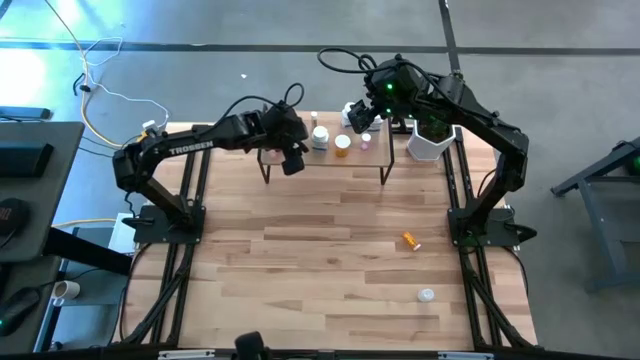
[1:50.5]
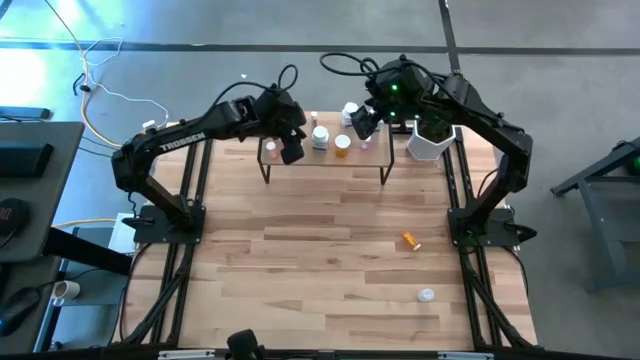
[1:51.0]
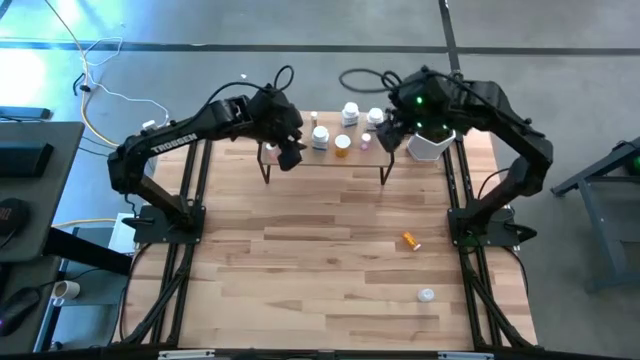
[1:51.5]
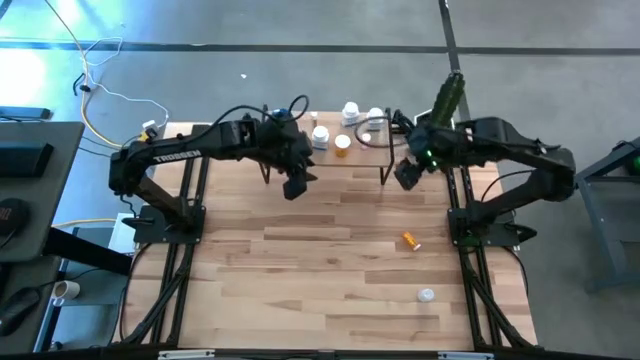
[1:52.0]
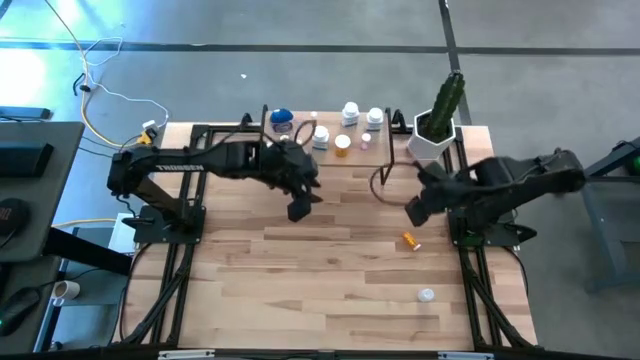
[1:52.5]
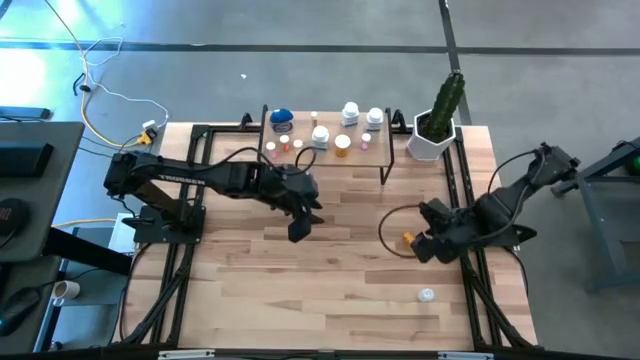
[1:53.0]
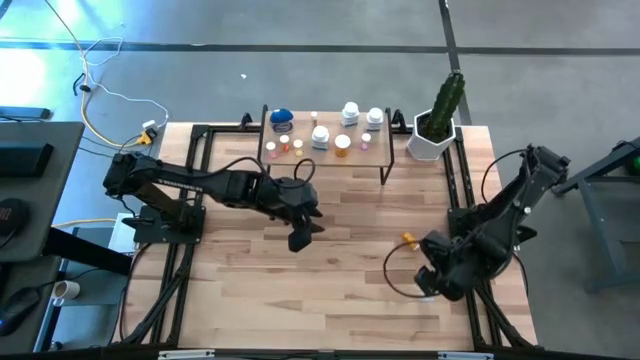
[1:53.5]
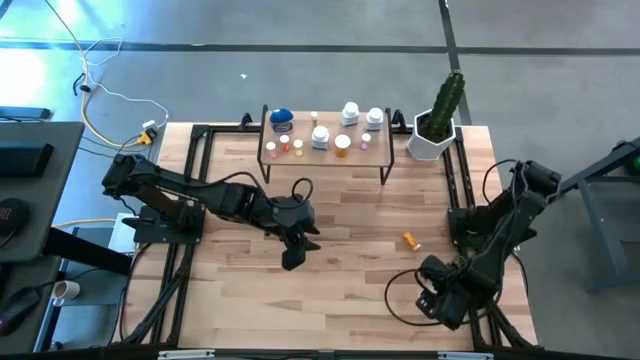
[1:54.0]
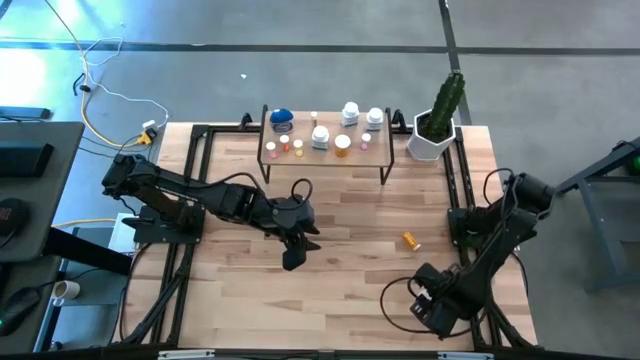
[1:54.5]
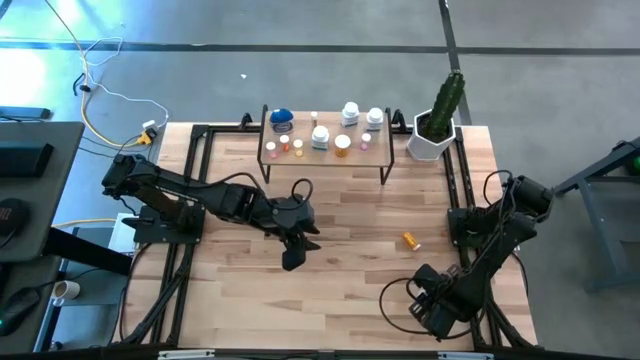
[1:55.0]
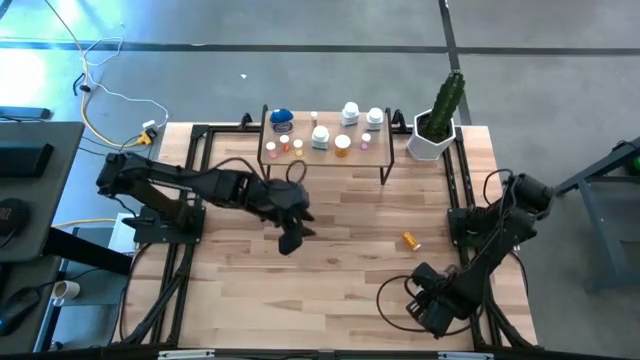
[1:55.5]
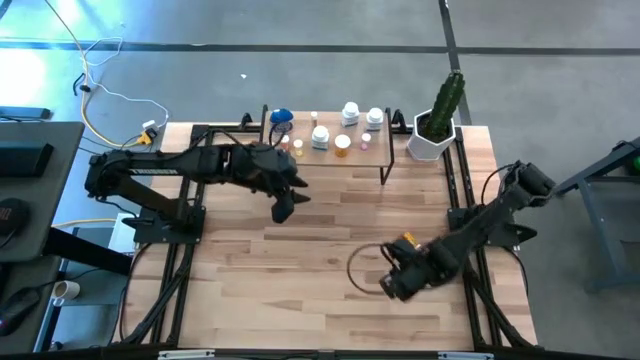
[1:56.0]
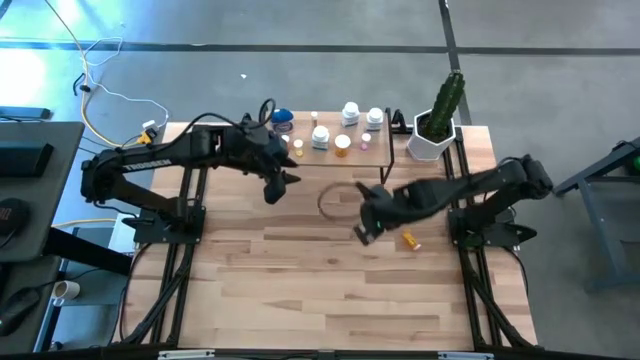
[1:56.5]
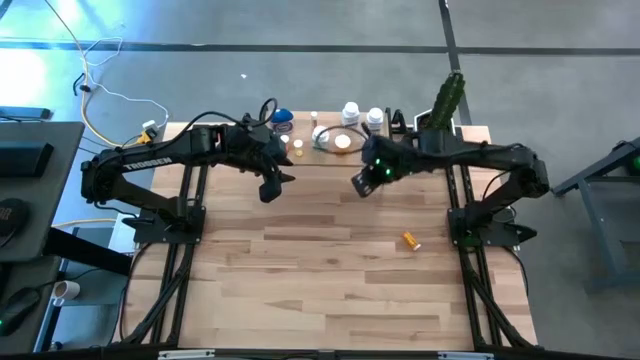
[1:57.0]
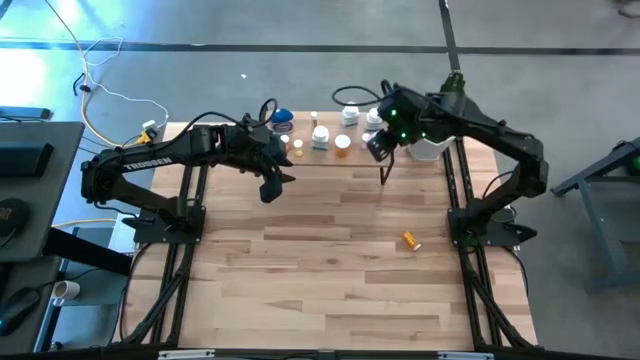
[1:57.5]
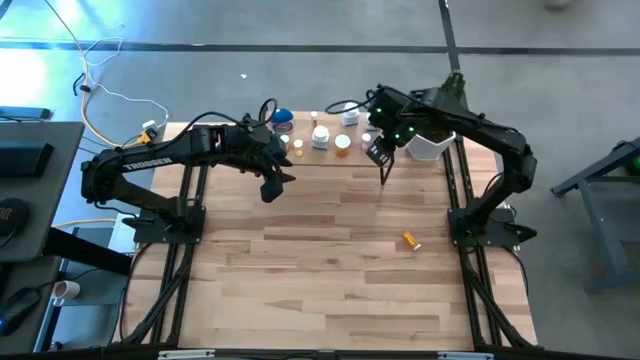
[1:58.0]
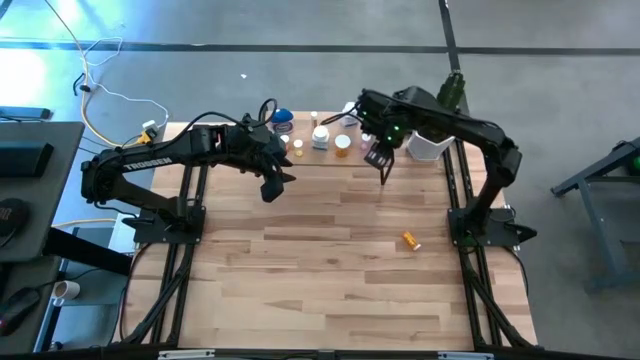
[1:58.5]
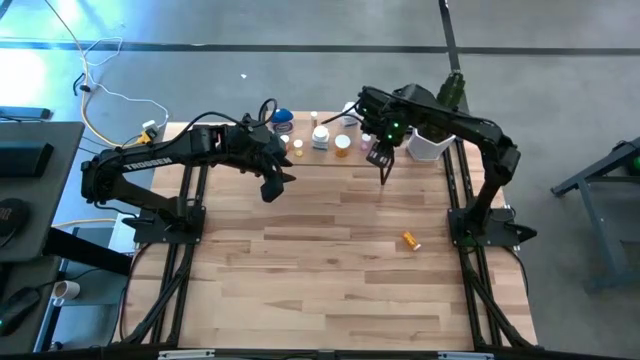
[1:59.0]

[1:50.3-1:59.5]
Task: Pick and place medicine bottles onto shelf by color
Put the white pill bottle on the shelf

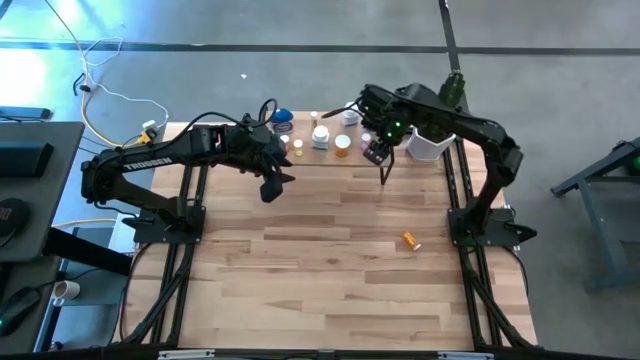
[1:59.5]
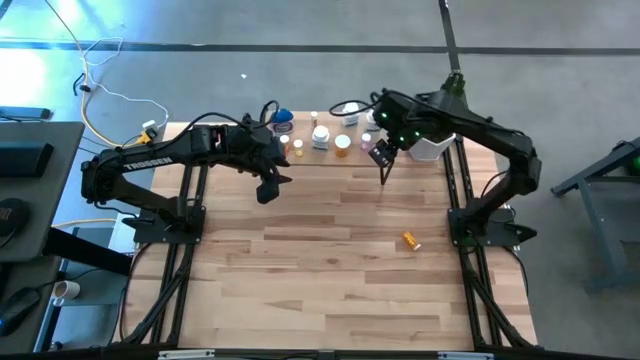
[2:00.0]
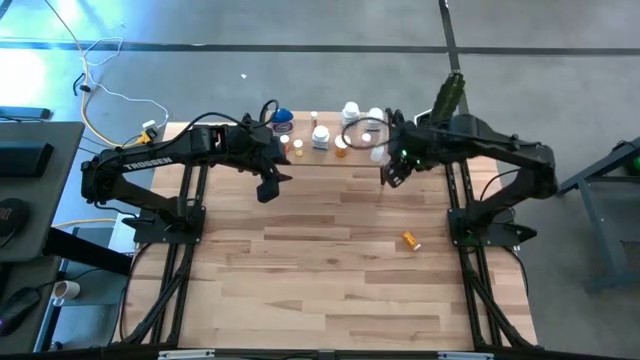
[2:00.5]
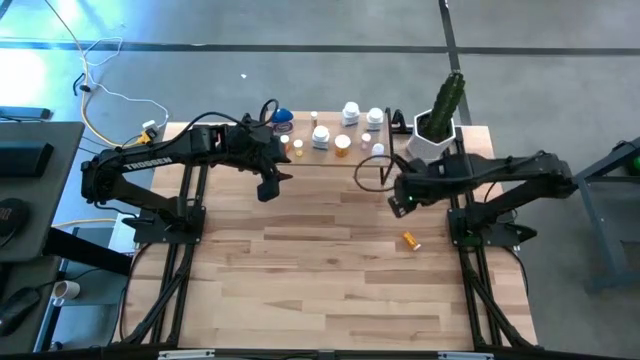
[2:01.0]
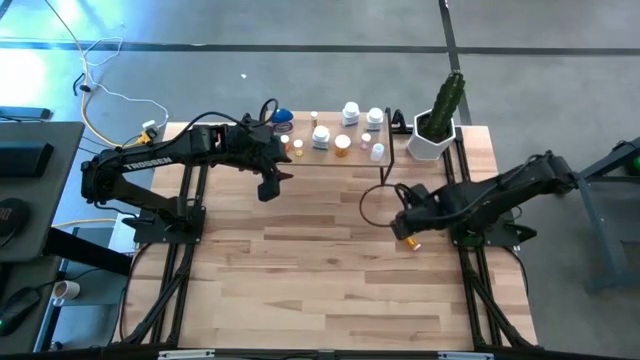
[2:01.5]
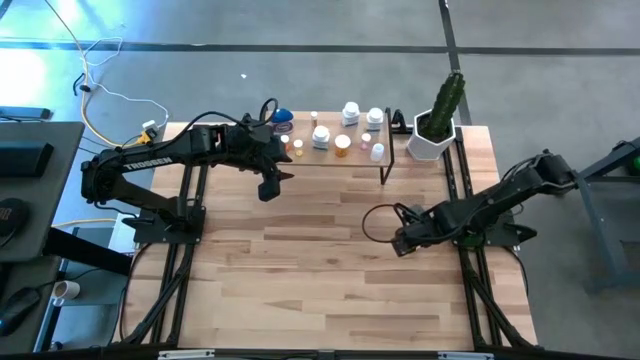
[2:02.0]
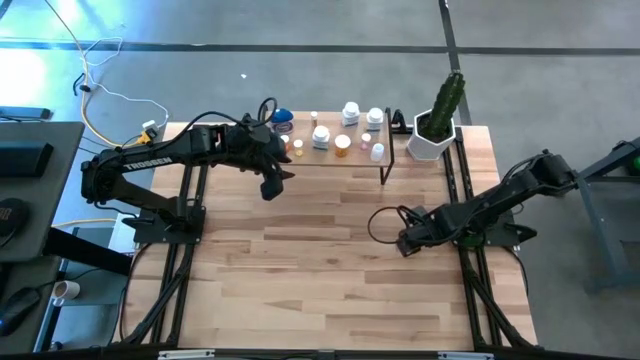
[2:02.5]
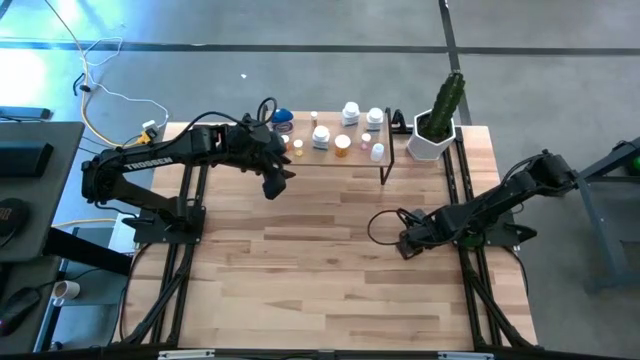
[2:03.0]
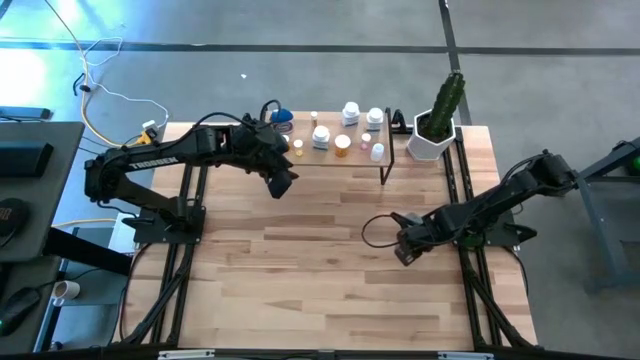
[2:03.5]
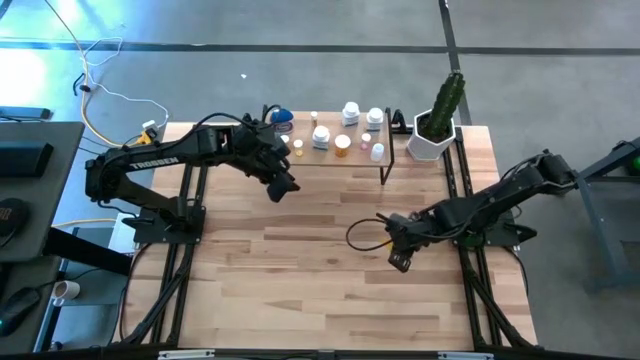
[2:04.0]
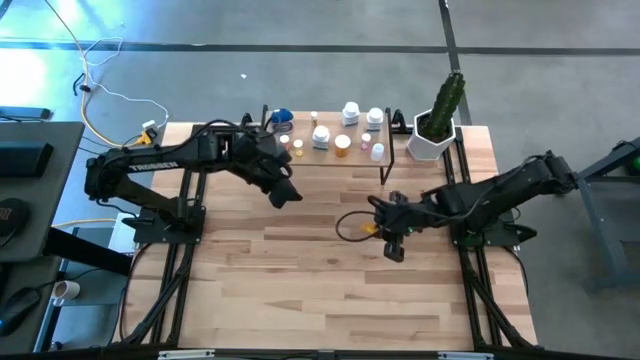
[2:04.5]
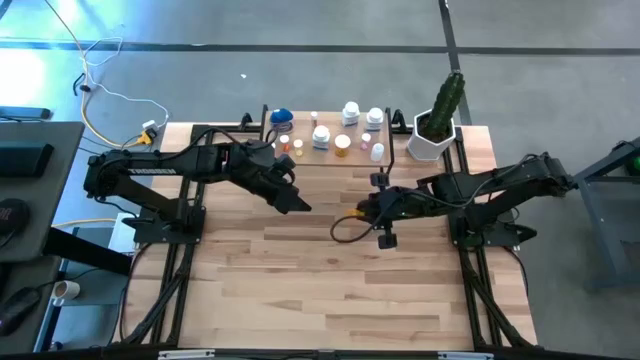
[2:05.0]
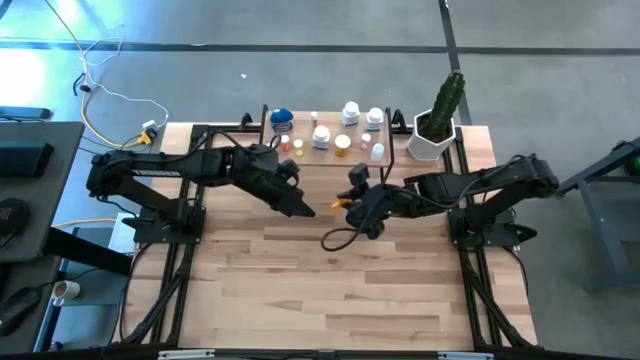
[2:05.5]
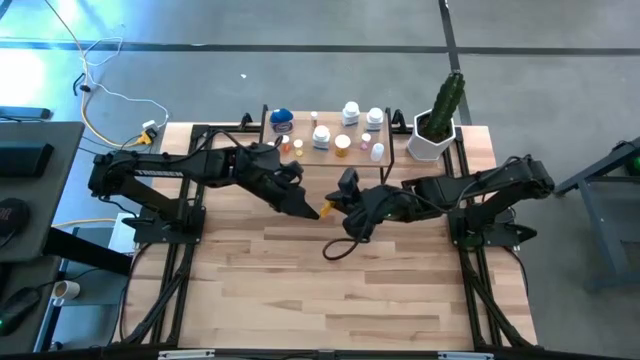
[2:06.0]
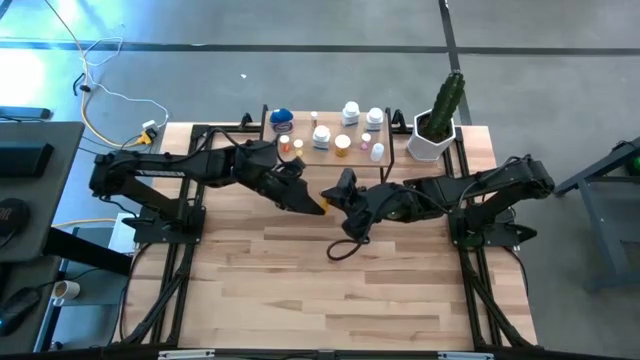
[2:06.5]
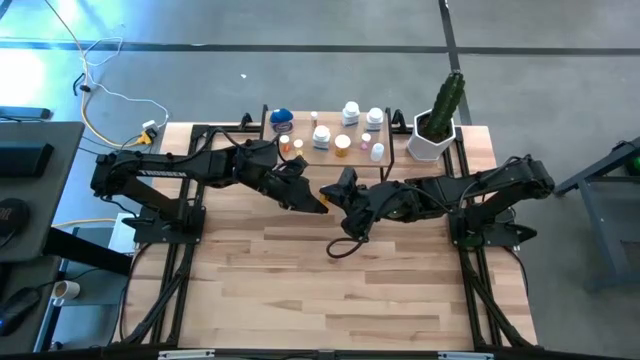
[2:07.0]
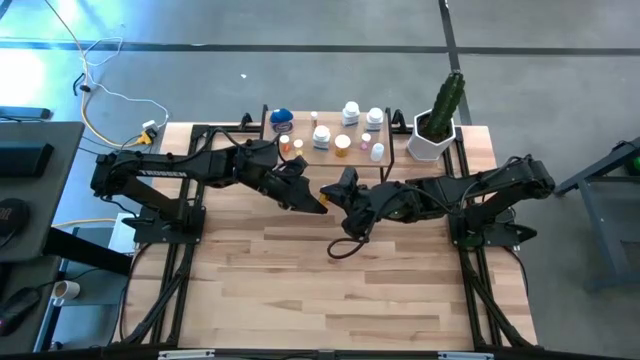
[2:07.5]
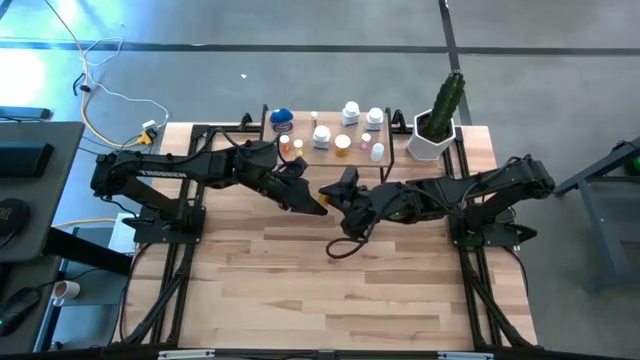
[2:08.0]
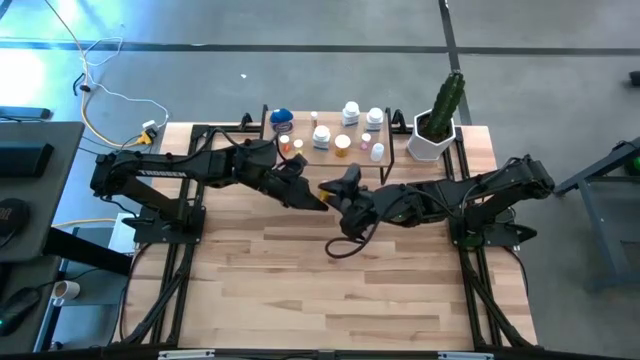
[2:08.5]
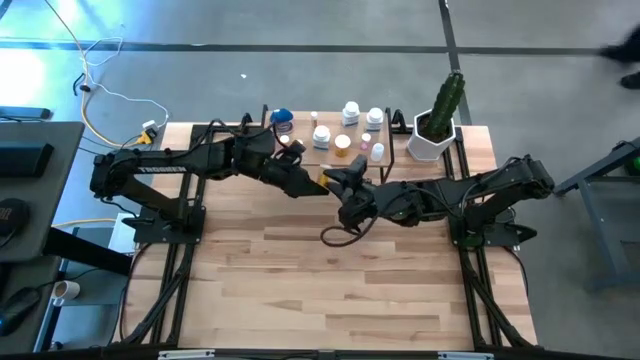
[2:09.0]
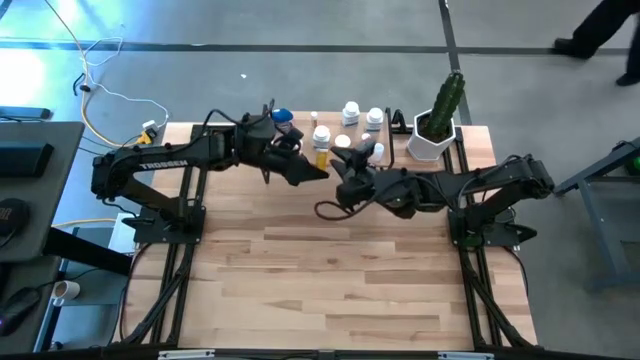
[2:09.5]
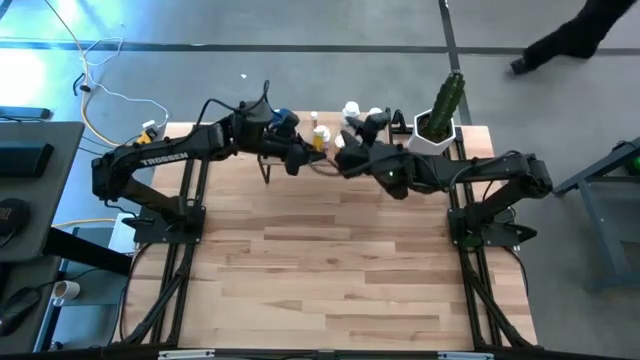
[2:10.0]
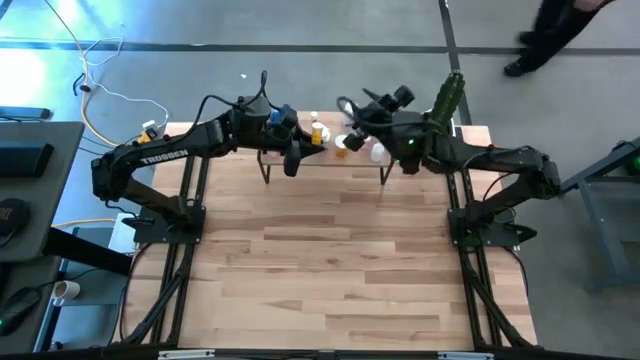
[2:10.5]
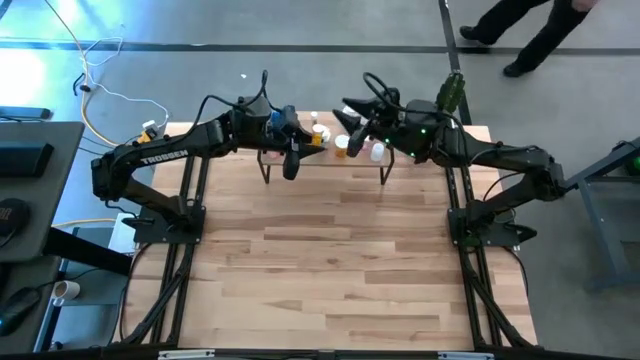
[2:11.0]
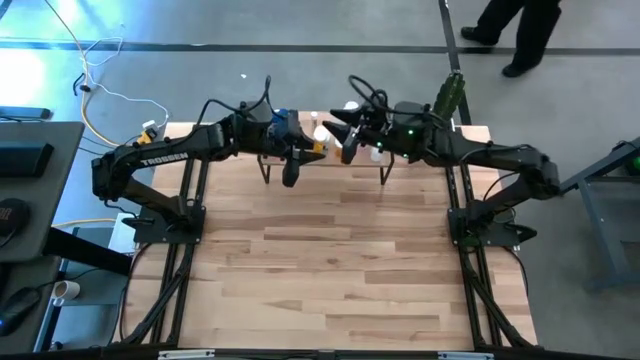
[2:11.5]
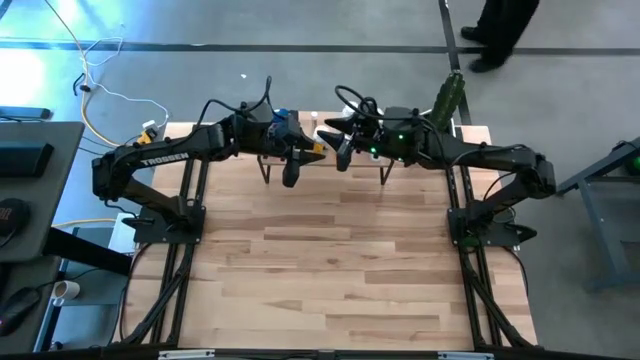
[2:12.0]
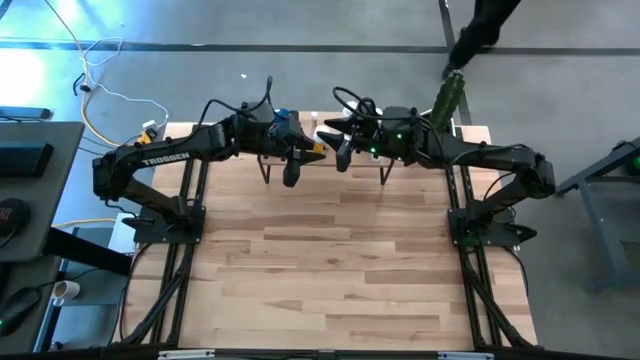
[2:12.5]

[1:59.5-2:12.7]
Put the orange pill bottle on the shelf
